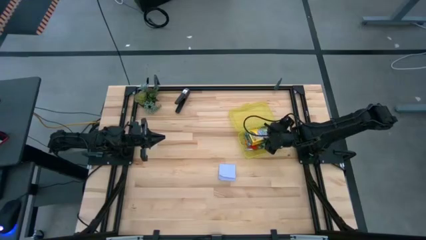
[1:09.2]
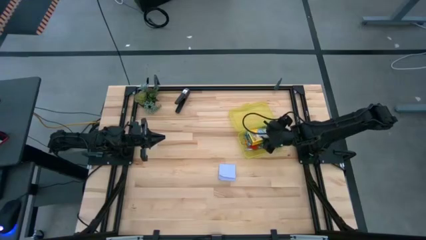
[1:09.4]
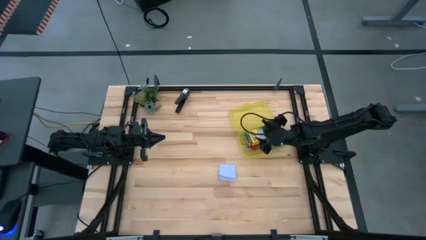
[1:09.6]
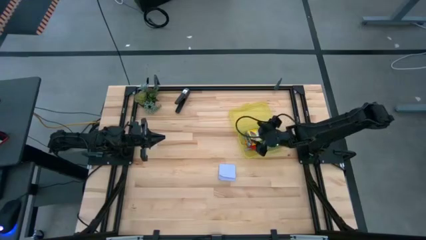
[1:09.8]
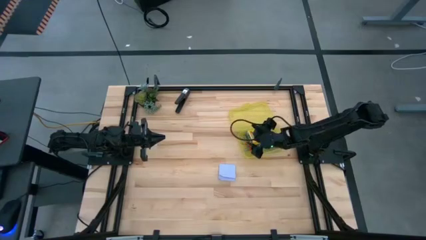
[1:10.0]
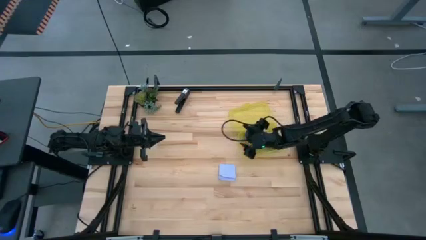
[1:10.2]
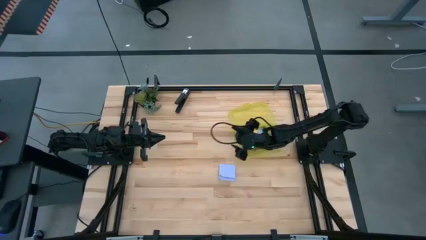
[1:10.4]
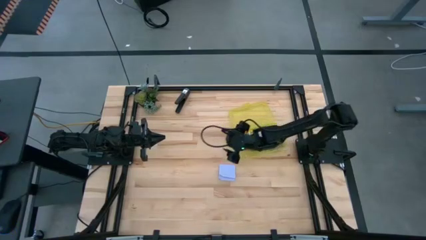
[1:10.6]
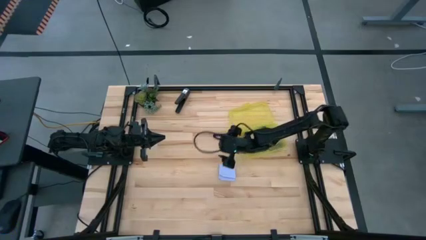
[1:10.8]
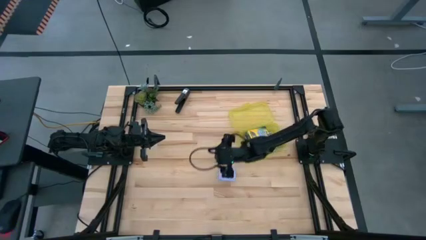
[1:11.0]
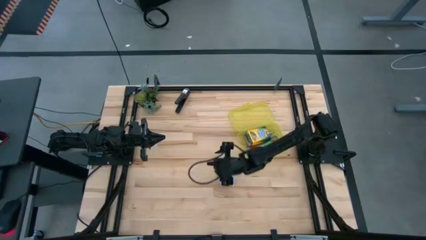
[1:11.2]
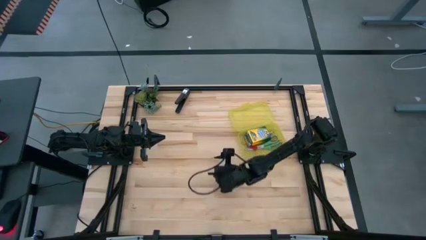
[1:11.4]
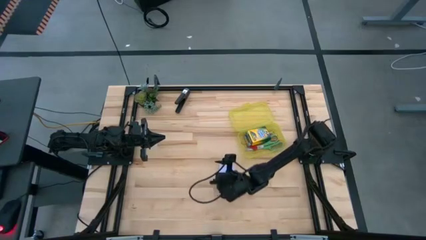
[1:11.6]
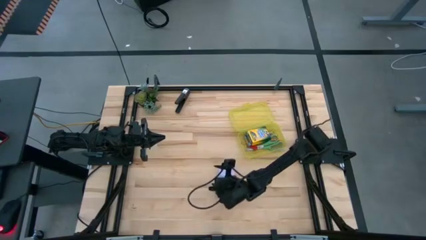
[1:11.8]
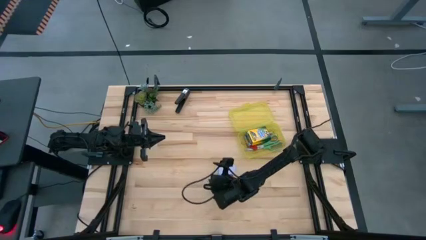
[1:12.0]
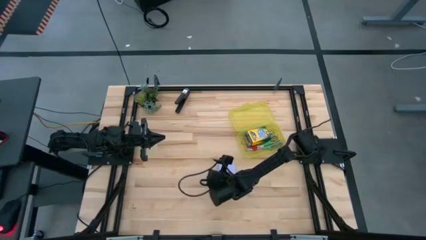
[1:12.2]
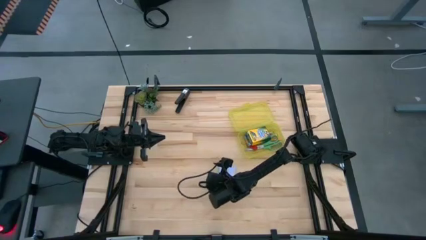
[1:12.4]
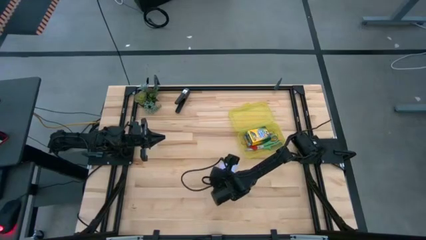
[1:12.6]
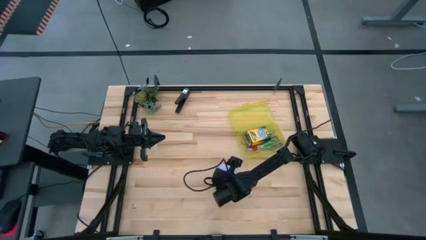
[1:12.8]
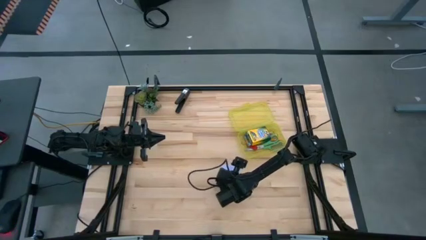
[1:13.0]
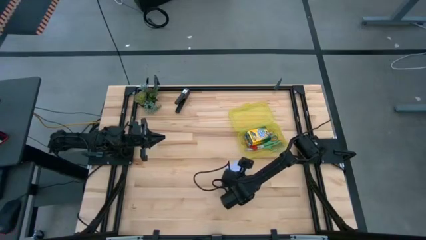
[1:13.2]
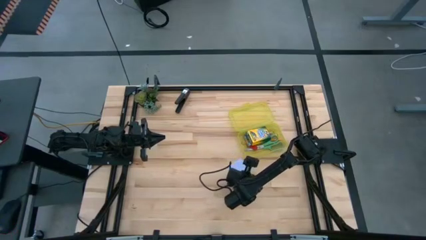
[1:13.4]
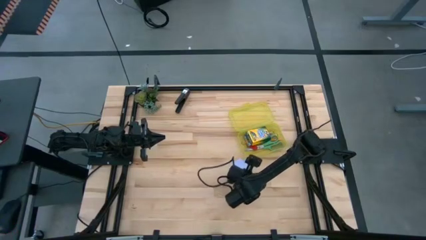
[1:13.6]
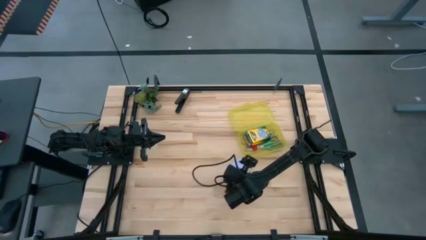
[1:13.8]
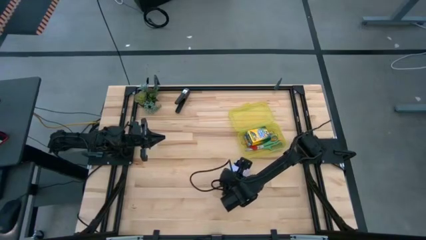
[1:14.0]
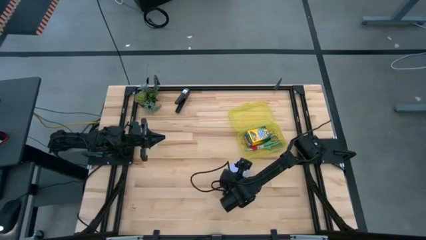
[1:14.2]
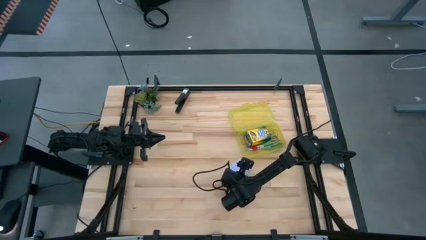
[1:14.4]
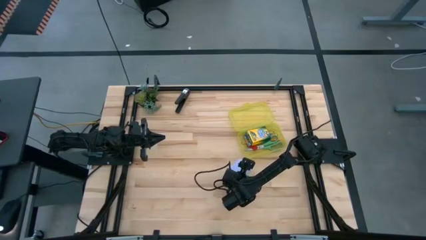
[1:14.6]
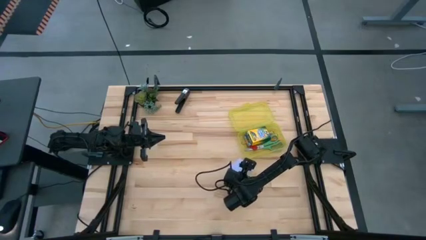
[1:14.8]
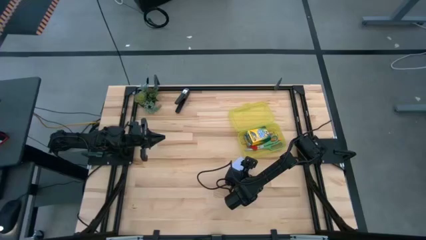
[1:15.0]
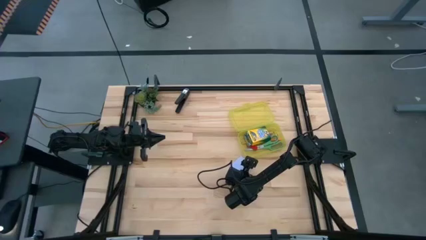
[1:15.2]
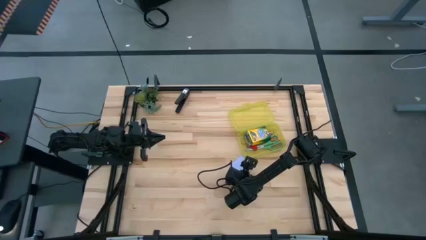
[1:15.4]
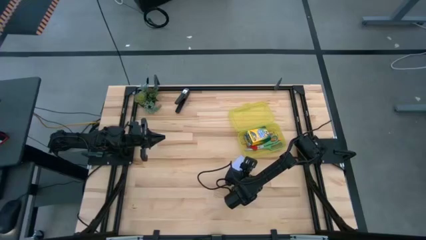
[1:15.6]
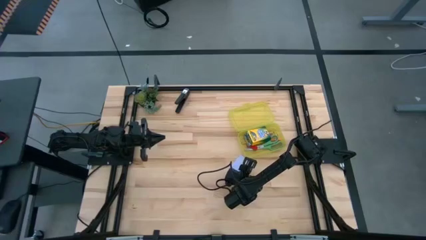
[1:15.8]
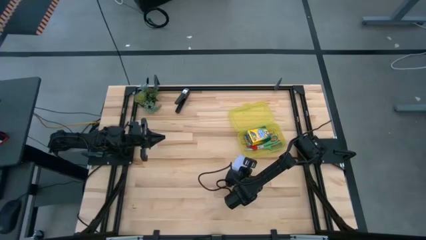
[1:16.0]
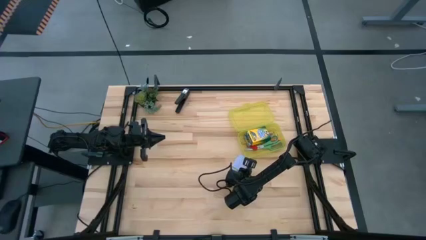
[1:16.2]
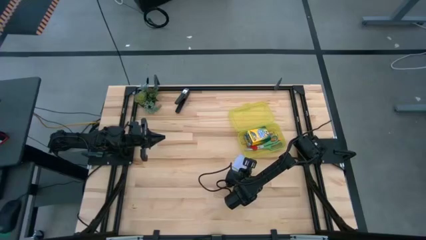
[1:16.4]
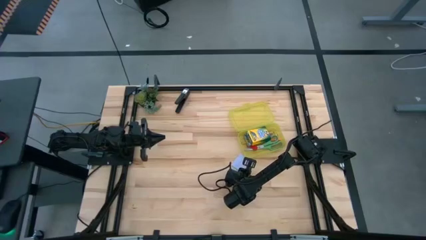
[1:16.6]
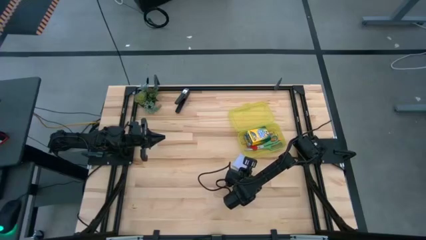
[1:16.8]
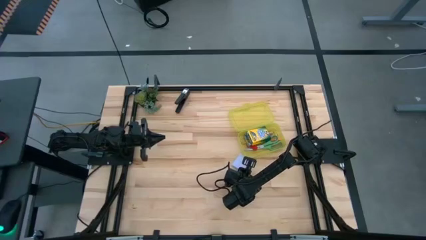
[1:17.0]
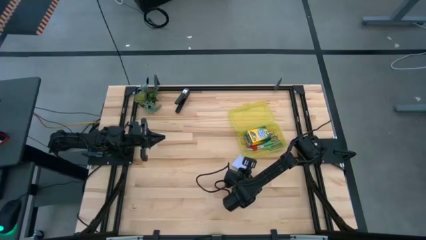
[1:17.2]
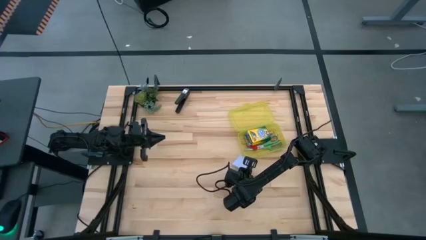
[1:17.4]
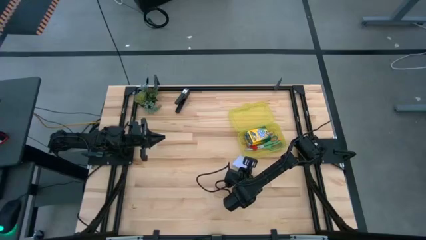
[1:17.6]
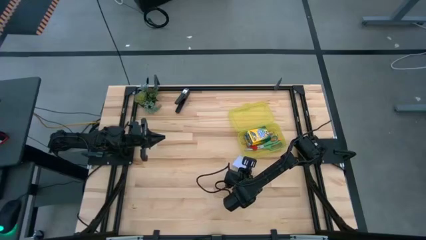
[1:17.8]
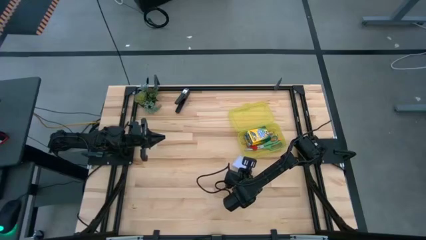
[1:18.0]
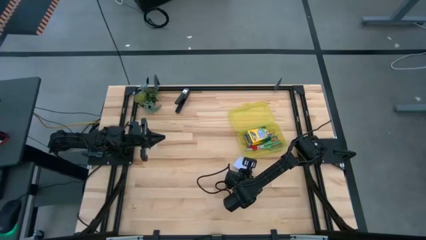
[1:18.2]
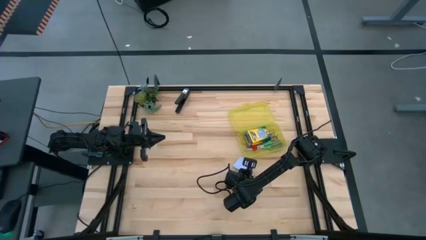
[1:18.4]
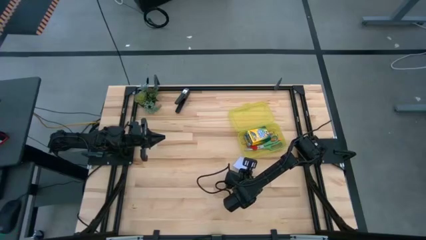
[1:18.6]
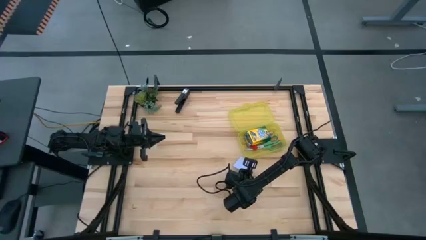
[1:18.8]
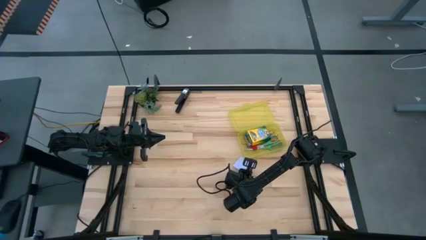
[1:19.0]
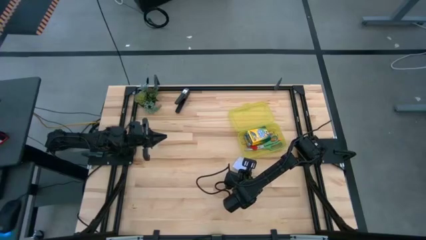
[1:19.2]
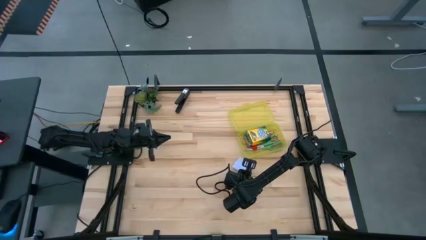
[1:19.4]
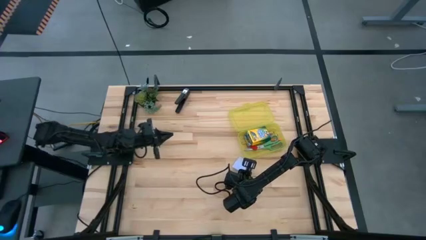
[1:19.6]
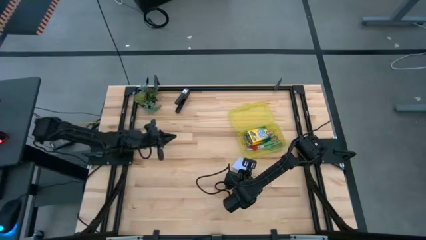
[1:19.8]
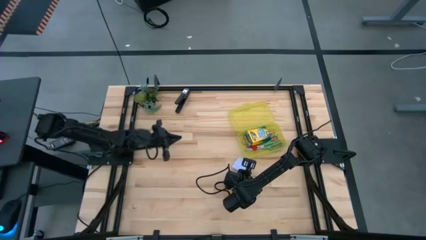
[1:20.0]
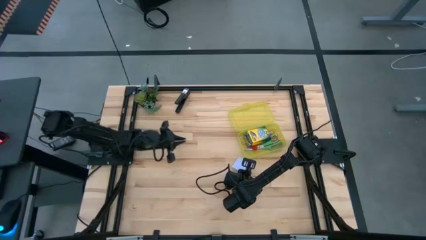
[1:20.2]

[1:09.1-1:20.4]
Task: Pack school essentials
Put the violet sticky notes into the yellow supply box

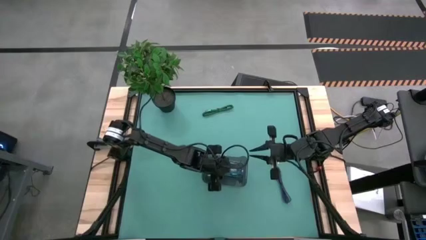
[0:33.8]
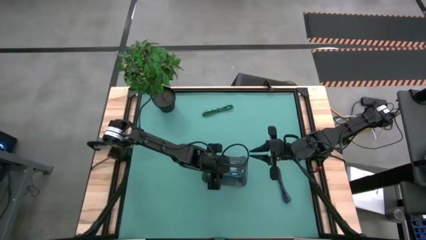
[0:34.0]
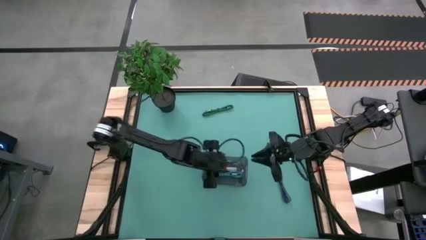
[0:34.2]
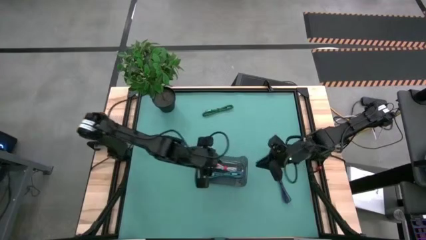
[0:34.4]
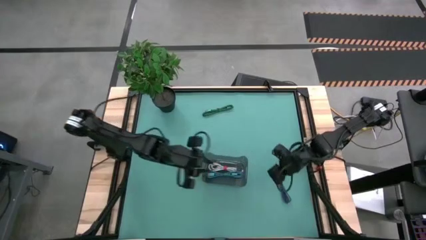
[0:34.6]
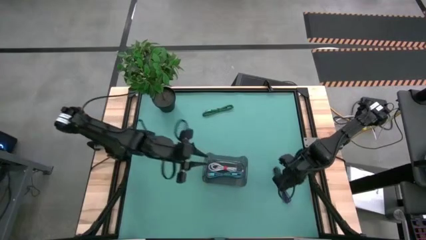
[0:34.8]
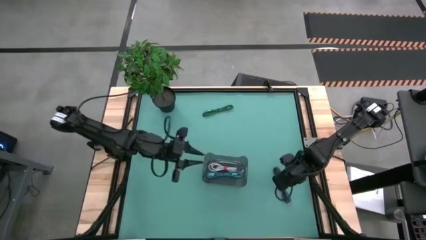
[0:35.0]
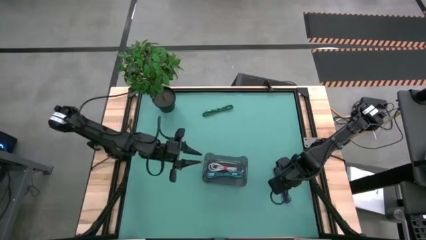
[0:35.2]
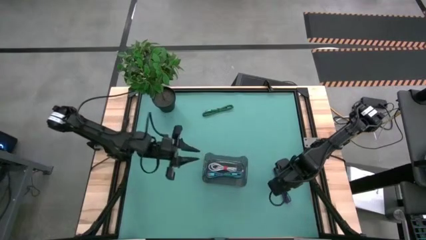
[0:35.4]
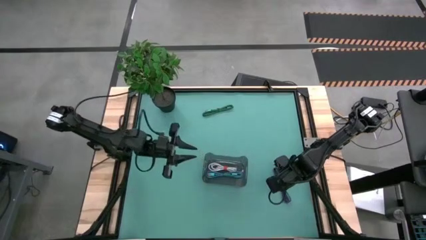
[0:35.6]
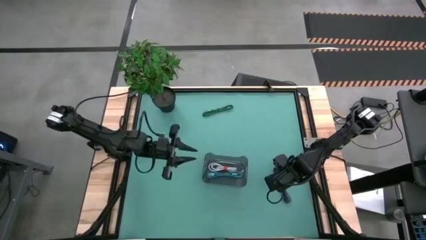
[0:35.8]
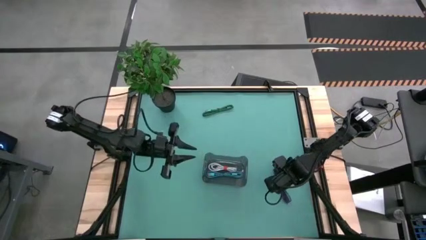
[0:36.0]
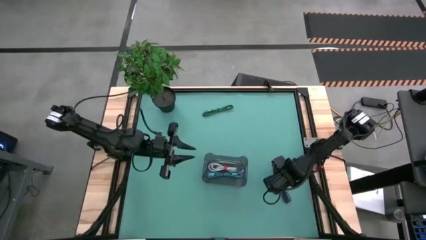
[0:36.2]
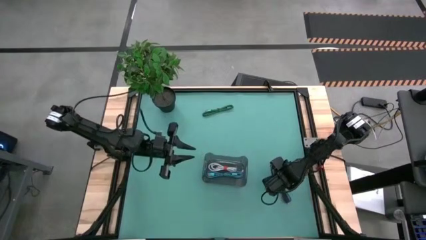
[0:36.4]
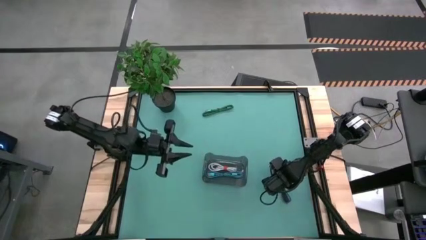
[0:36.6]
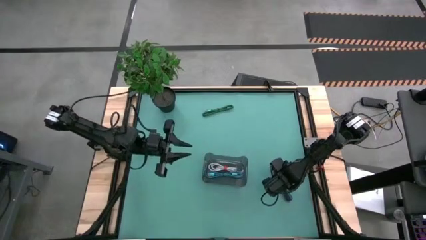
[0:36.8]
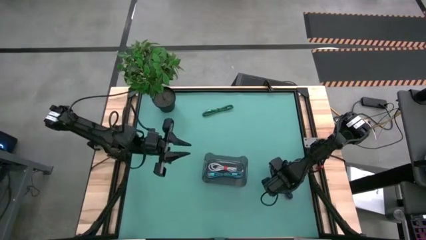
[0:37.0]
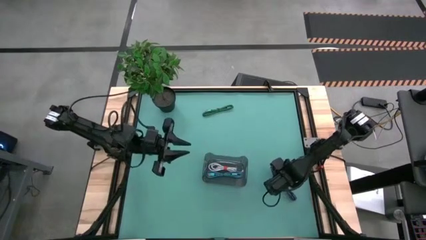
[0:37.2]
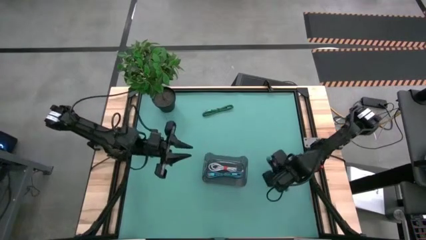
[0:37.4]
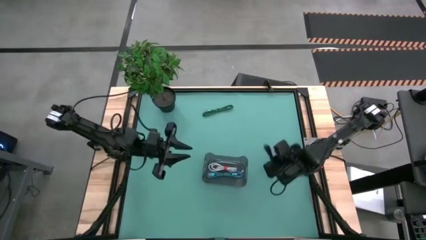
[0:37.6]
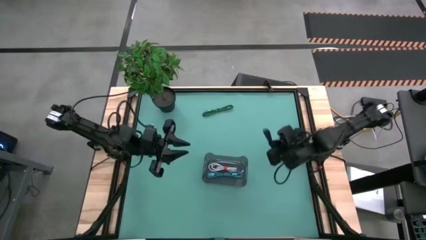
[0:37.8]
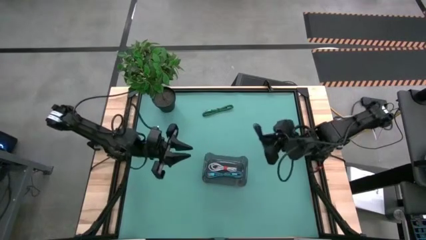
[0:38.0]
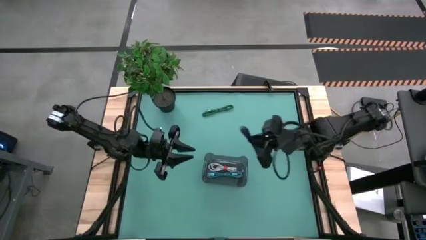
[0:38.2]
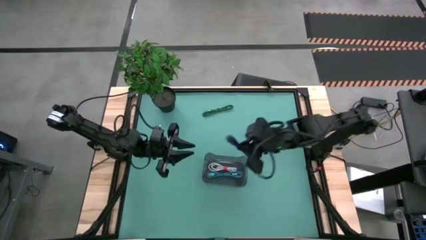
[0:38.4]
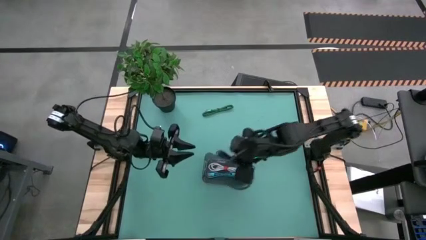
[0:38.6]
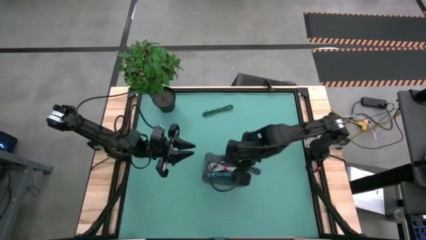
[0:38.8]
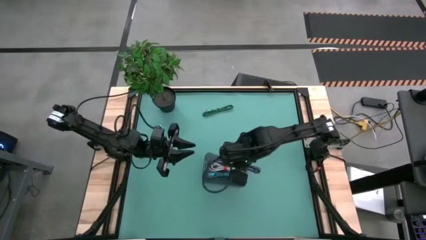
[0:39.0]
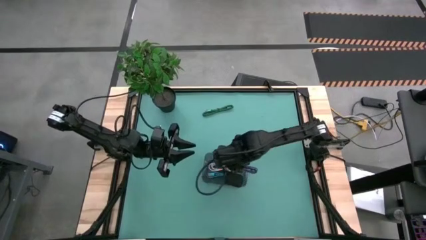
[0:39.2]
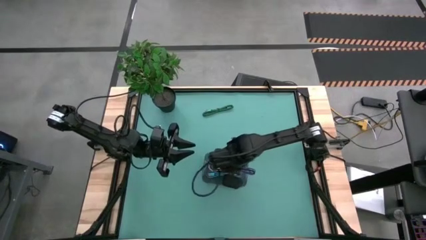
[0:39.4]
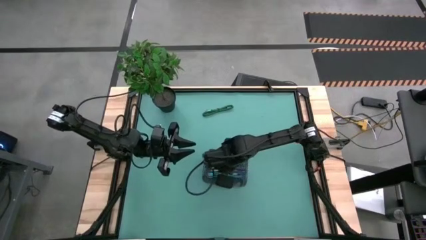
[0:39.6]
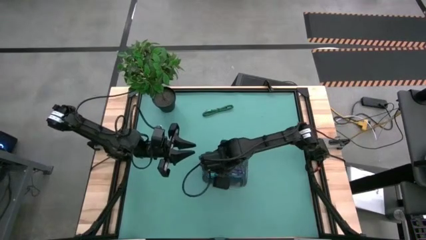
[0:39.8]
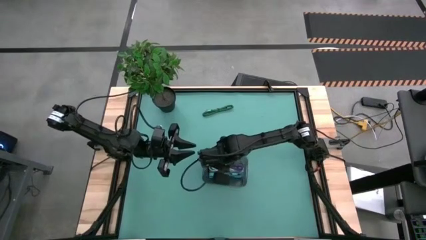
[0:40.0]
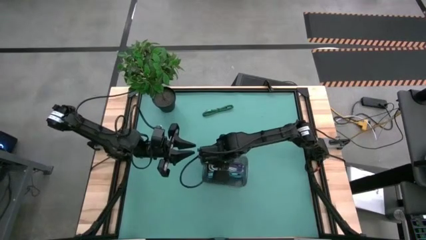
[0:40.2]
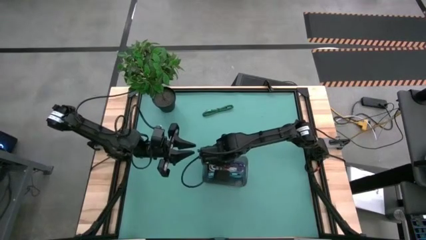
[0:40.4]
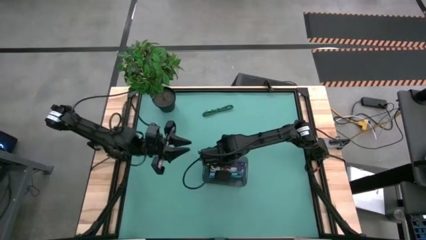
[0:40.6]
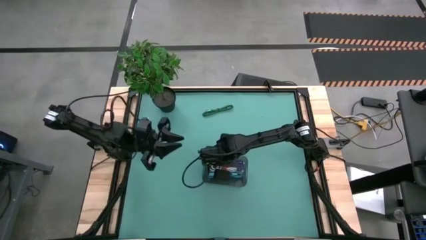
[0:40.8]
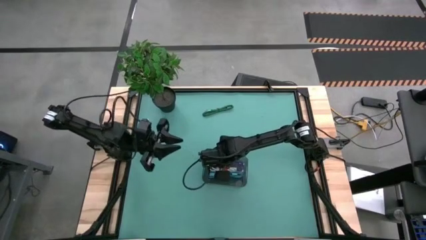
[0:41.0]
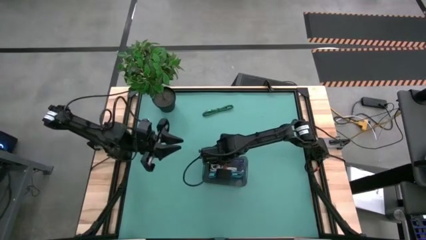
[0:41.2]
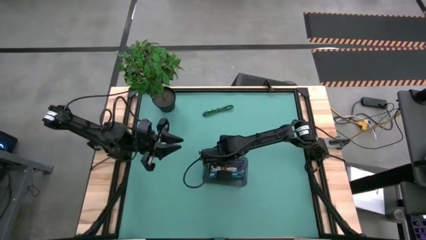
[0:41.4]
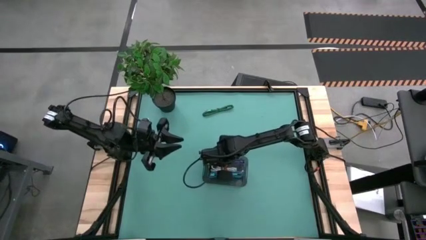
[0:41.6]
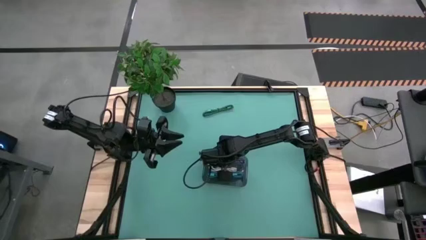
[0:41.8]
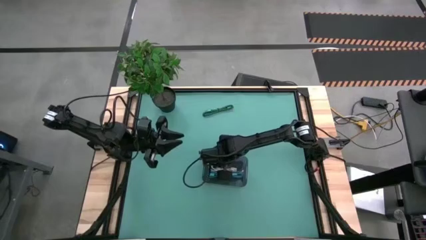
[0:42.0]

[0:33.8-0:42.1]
Task: Pick and place USB-C Cables
Put the black purple charger cable into the black bin
